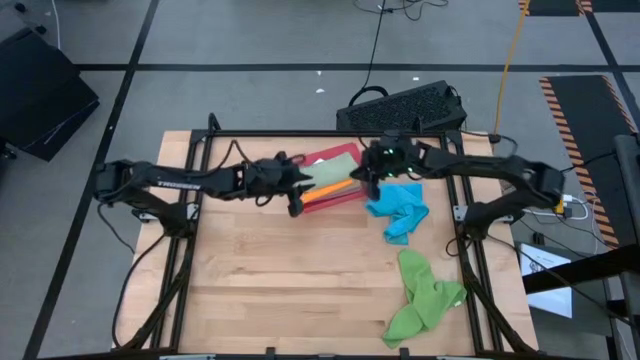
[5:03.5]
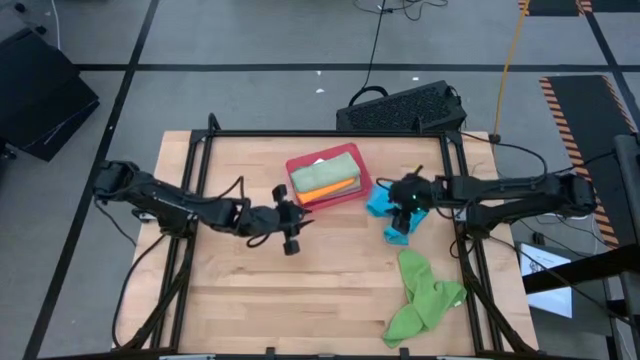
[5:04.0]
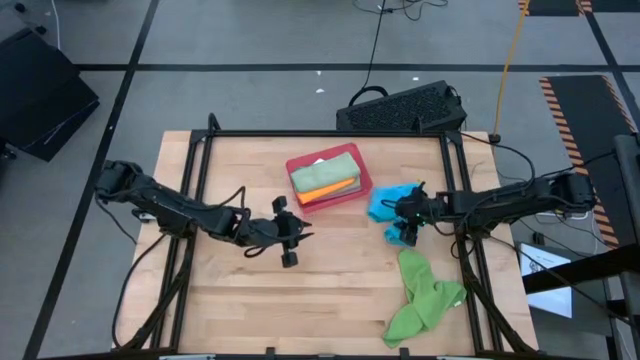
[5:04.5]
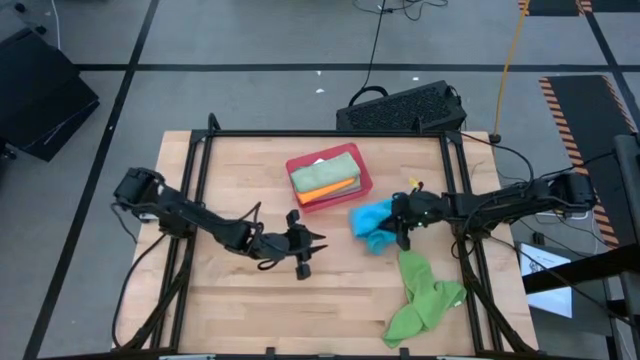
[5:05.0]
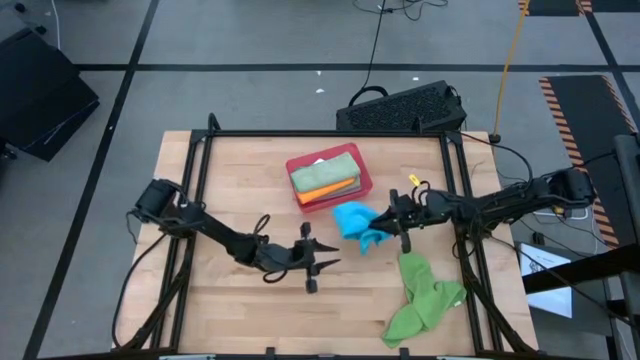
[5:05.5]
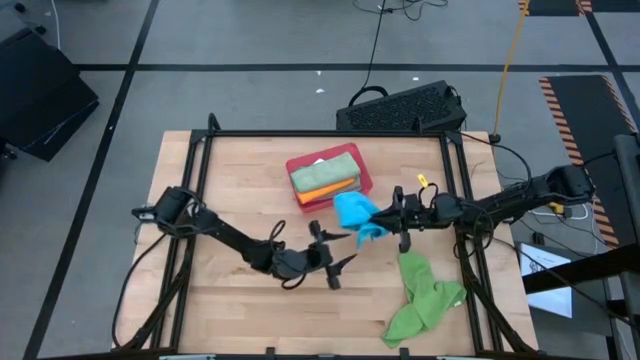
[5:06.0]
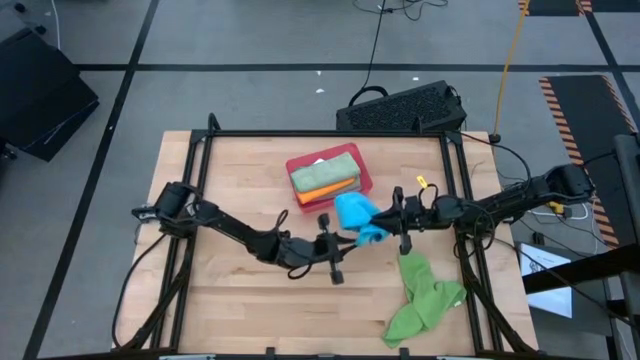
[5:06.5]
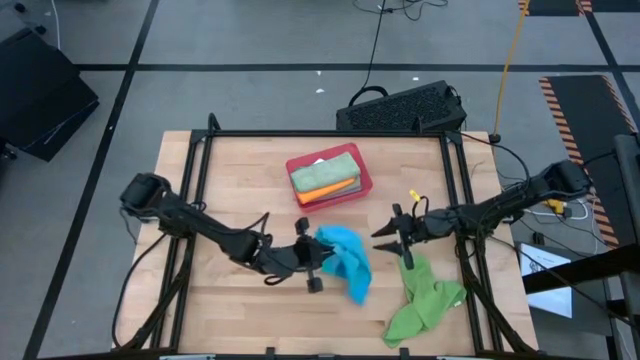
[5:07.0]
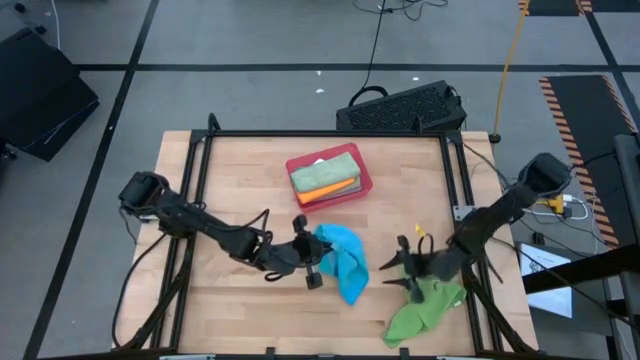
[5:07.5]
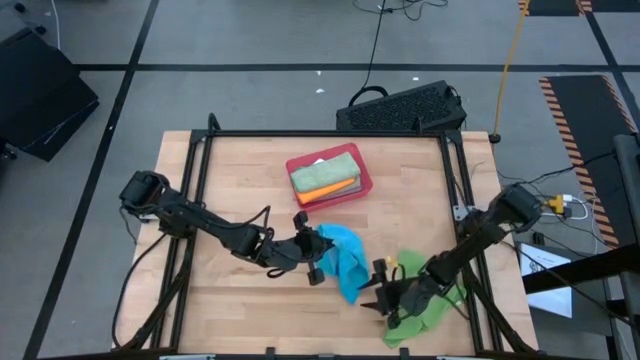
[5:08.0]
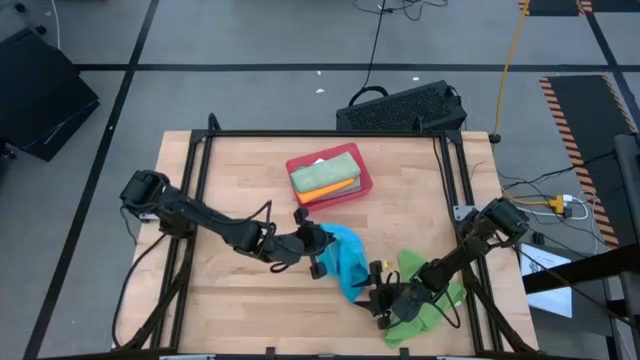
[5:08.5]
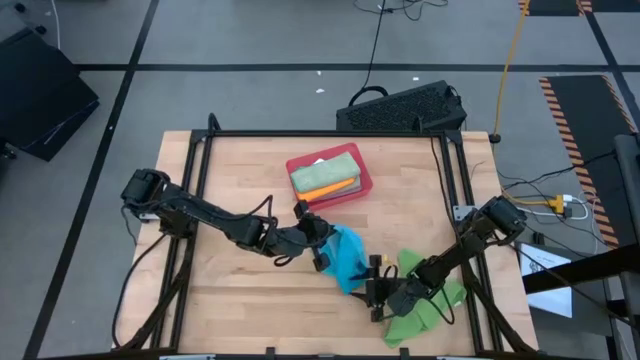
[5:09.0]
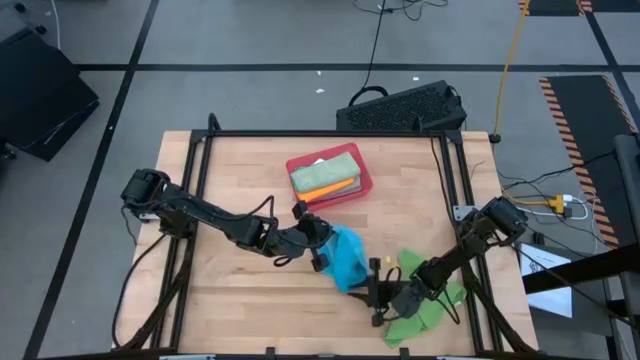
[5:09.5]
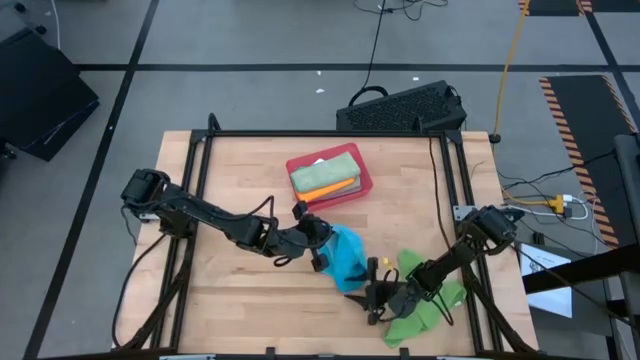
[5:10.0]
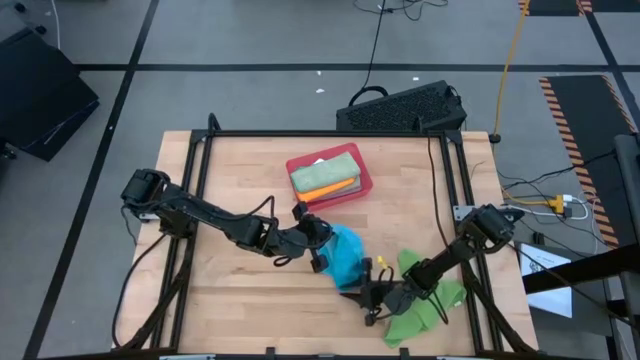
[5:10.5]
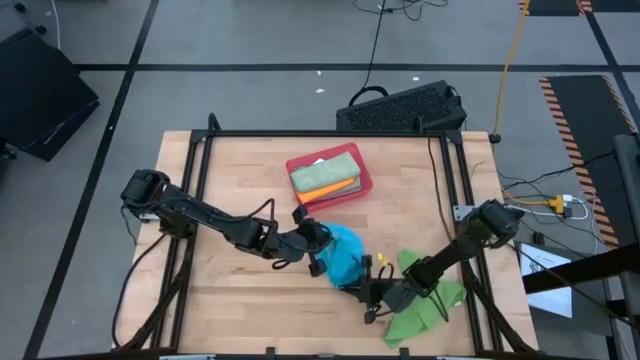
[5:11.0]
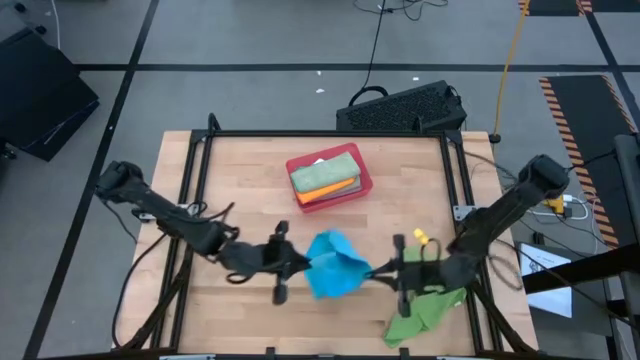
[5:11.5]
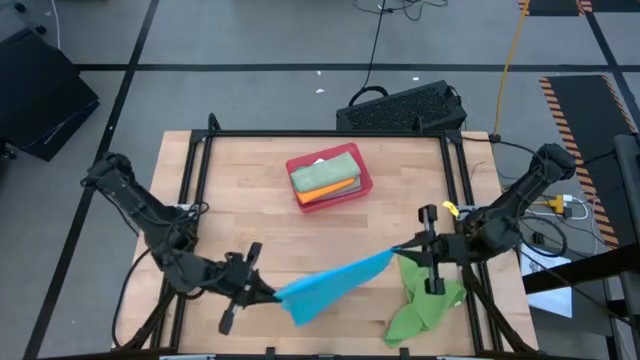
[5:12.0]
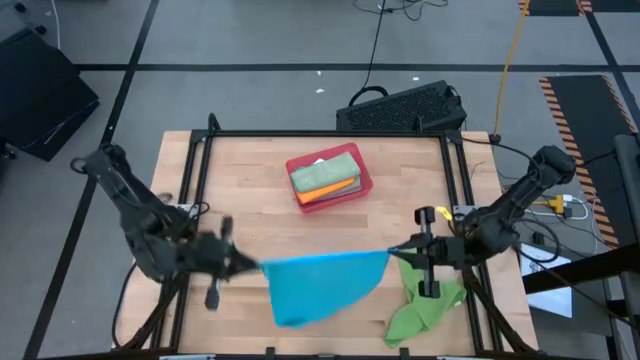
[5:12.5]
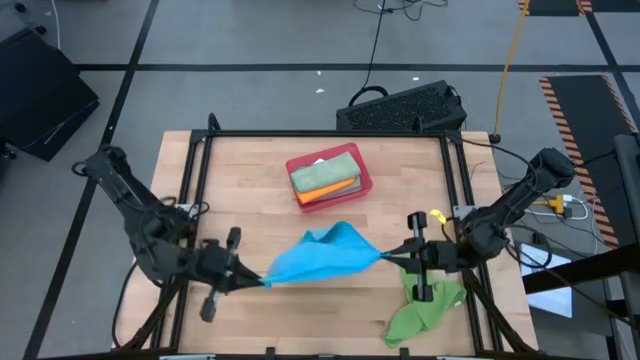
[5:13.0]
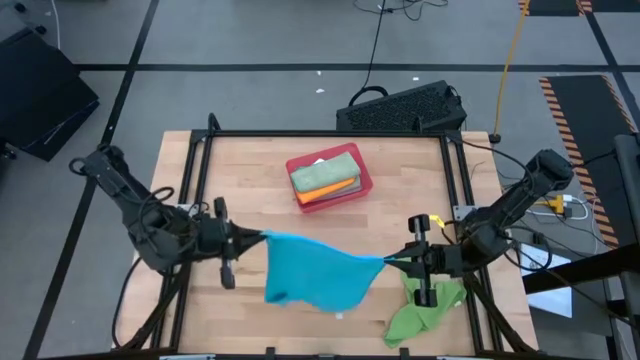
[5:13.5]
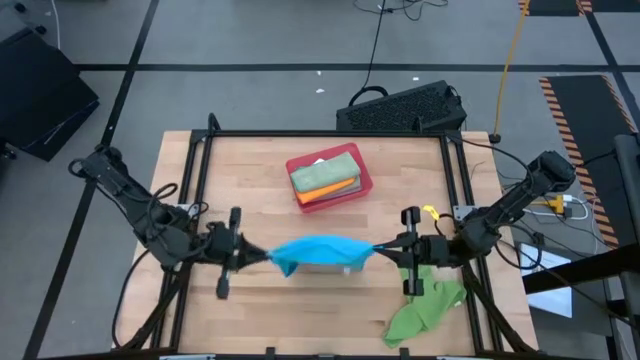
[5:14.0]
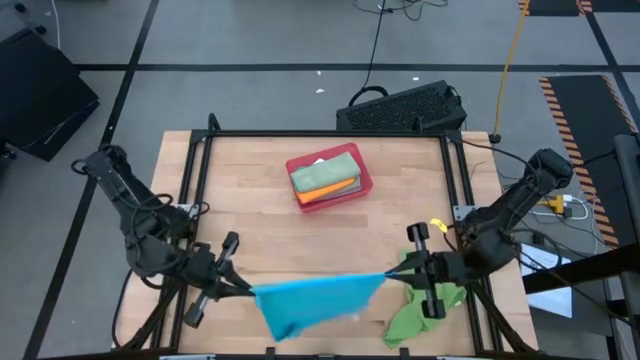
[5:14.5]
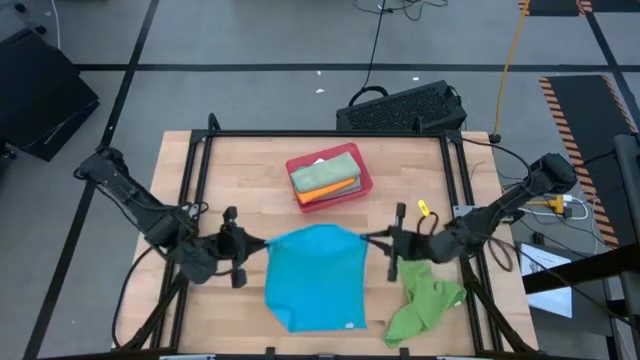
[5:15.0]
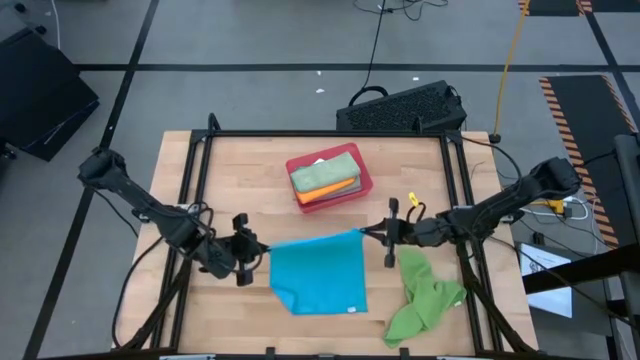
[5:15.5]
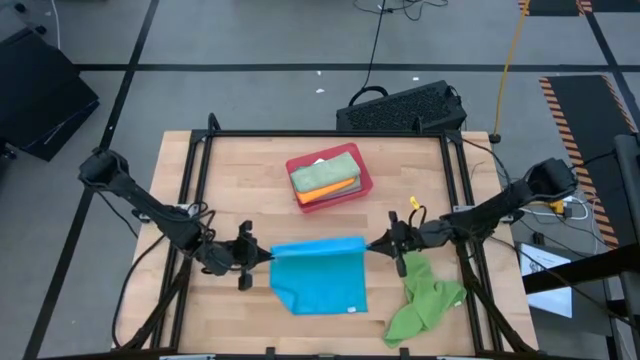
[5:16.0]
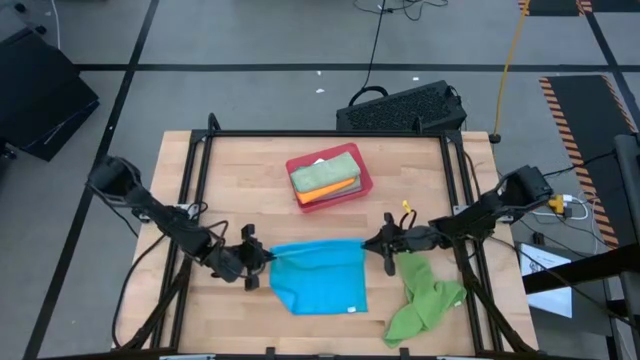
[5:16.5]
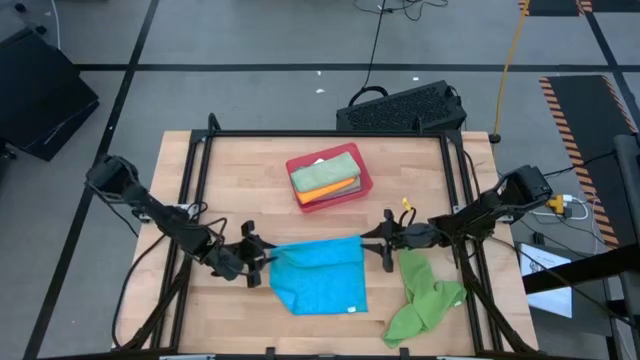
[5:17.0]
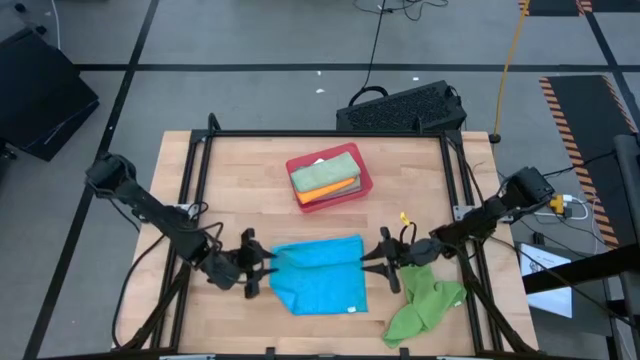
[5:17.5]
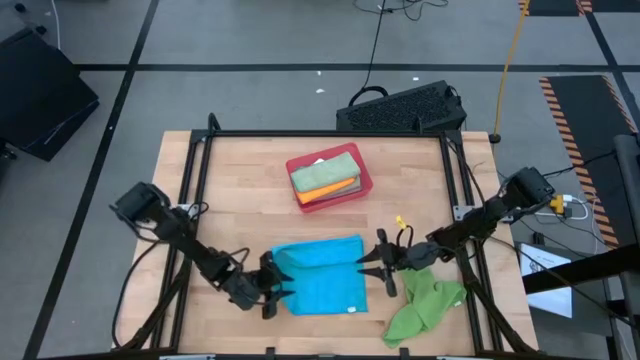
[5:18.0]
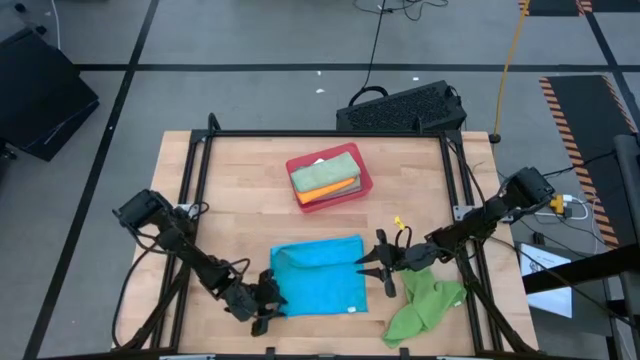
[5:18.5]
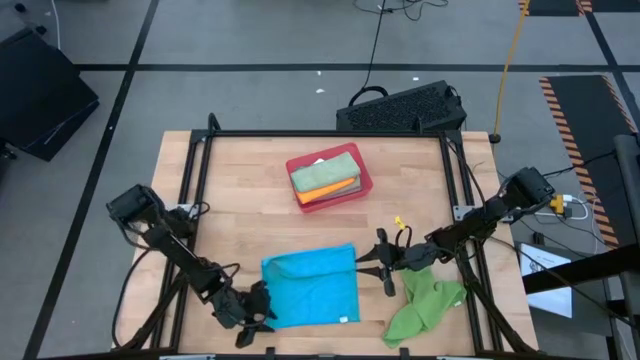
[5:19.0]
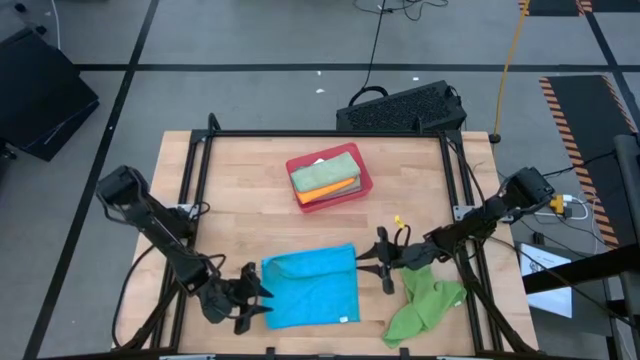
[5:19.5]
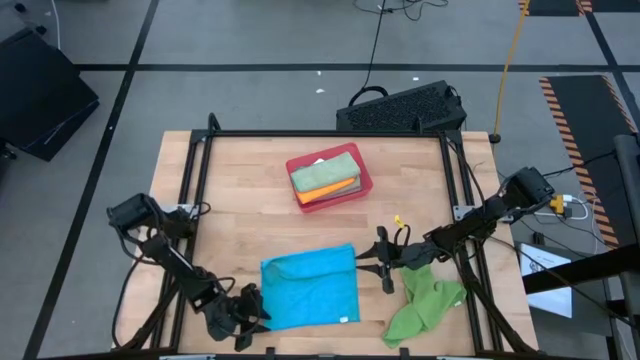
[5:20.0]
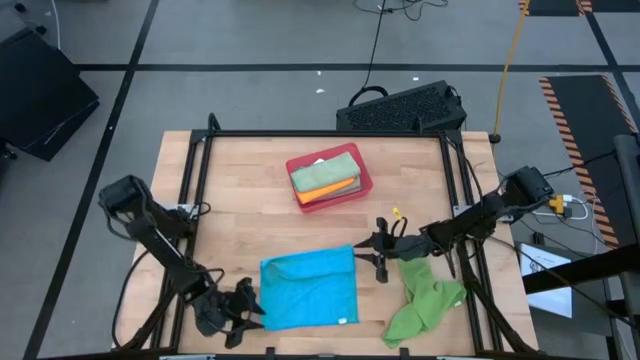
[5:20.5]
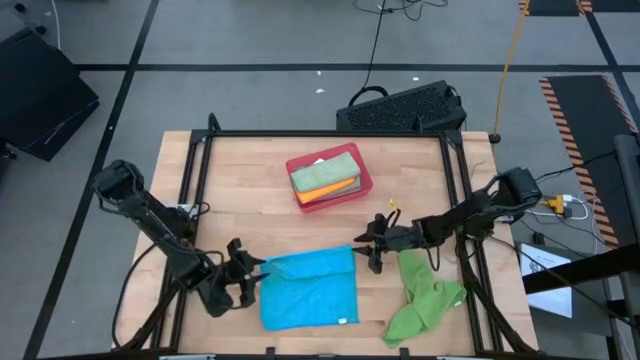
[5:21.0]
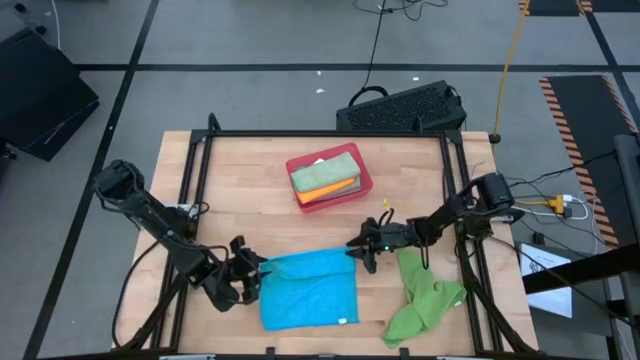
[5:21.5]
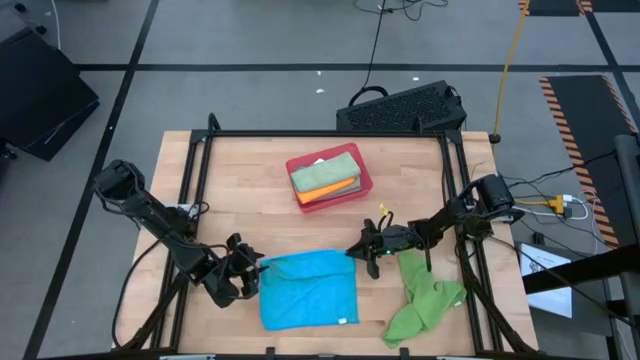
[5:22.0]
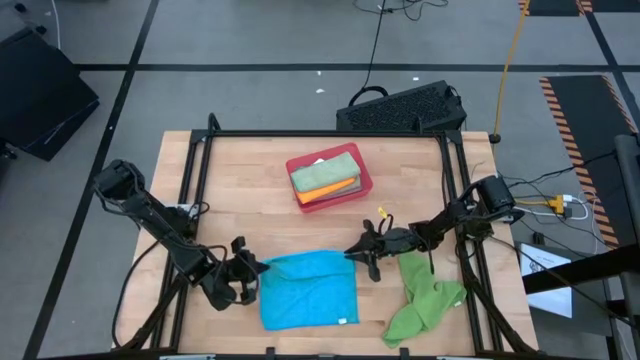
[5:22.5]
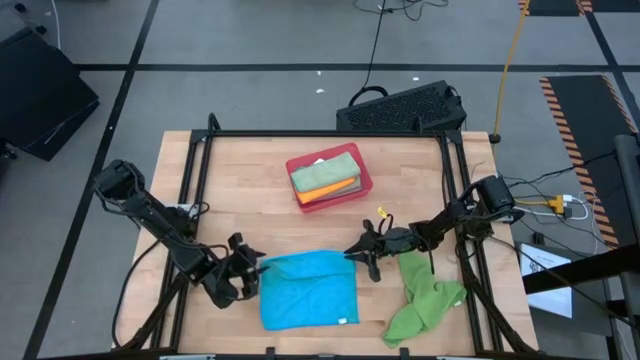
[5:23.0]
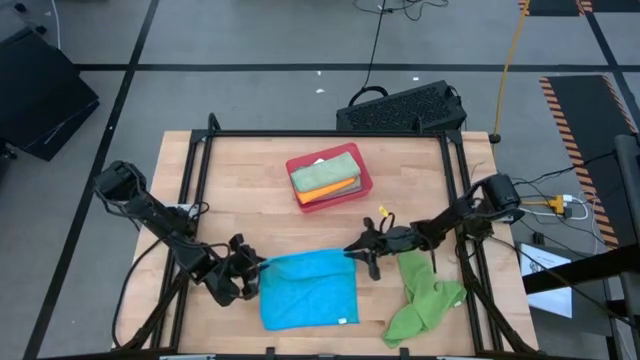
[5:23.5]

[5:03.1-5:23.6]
Task: Fold microfiber towels
Fold the blue microfiber cloth
